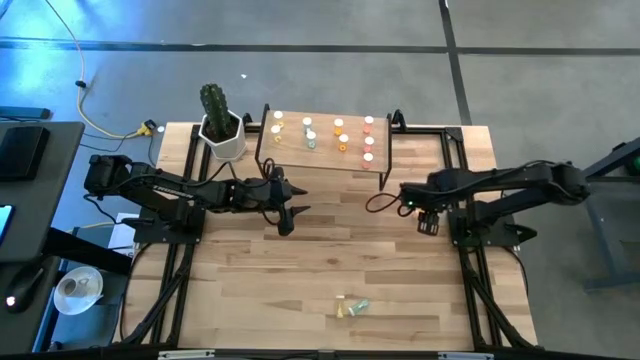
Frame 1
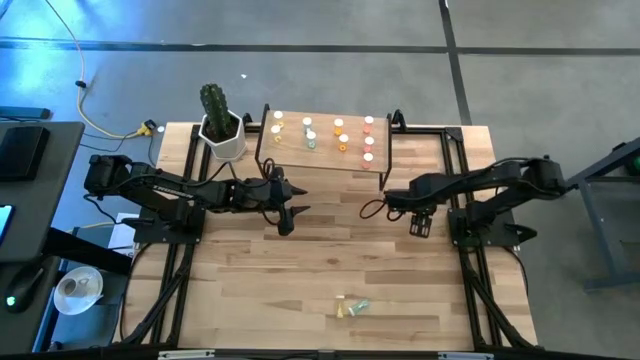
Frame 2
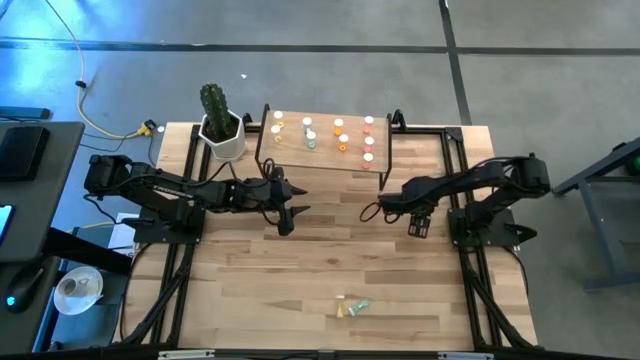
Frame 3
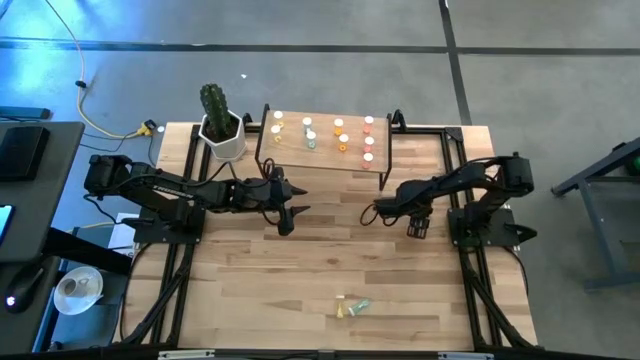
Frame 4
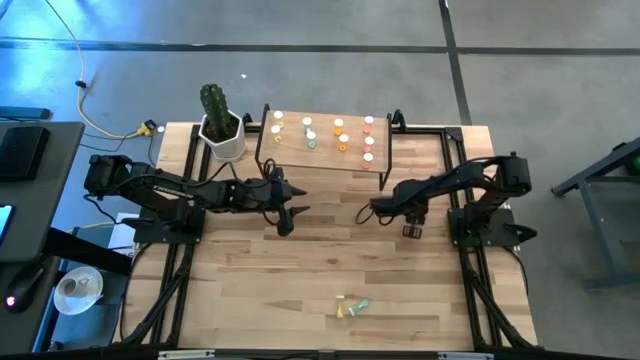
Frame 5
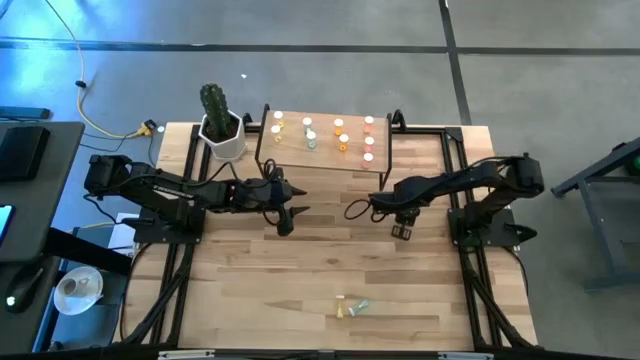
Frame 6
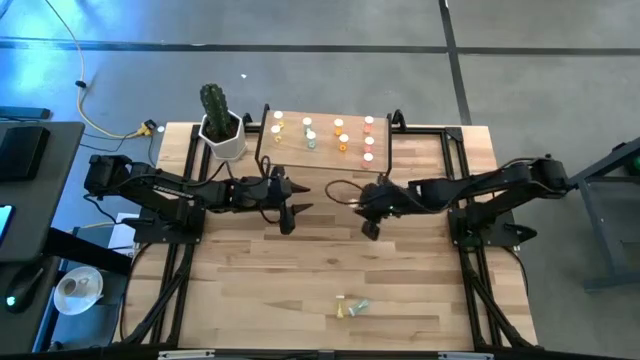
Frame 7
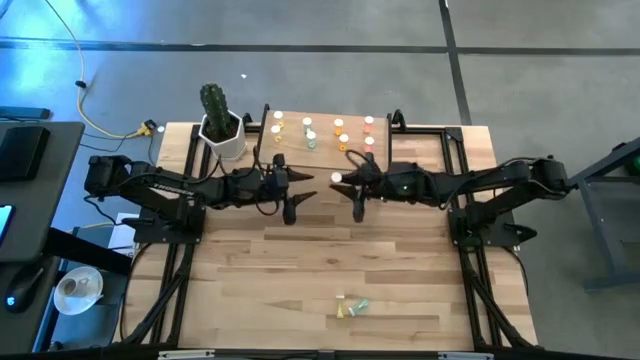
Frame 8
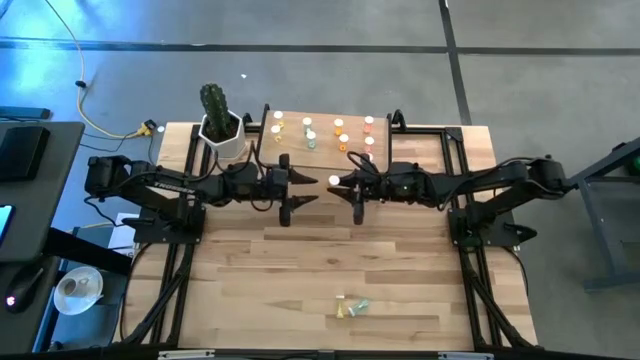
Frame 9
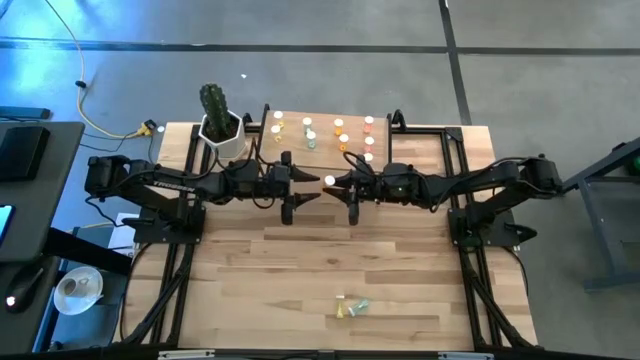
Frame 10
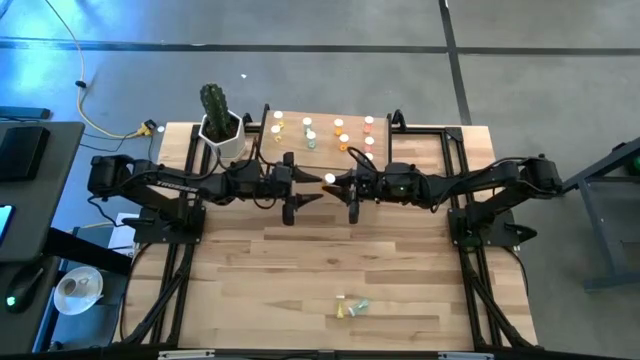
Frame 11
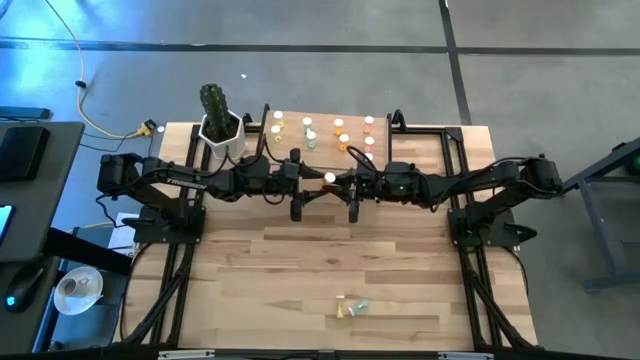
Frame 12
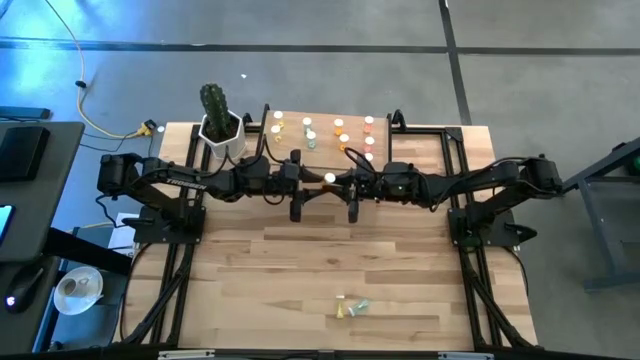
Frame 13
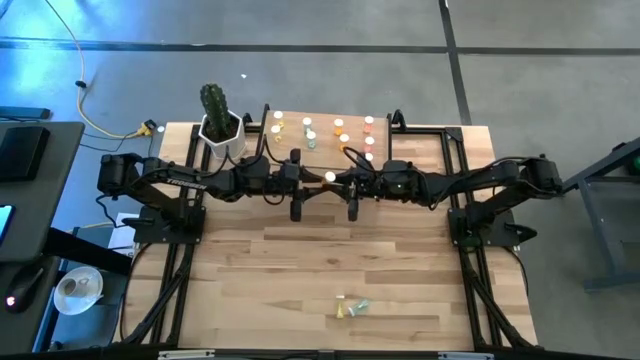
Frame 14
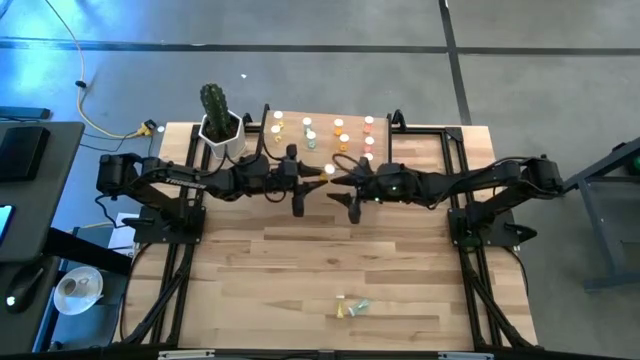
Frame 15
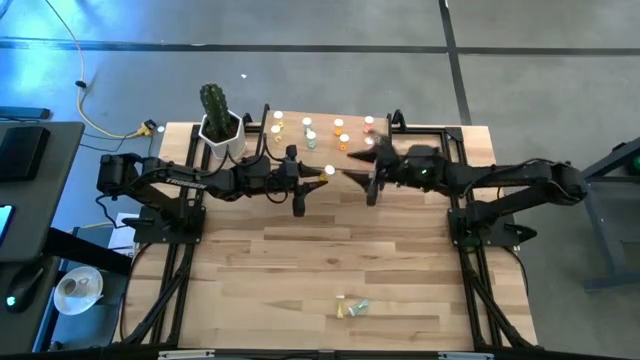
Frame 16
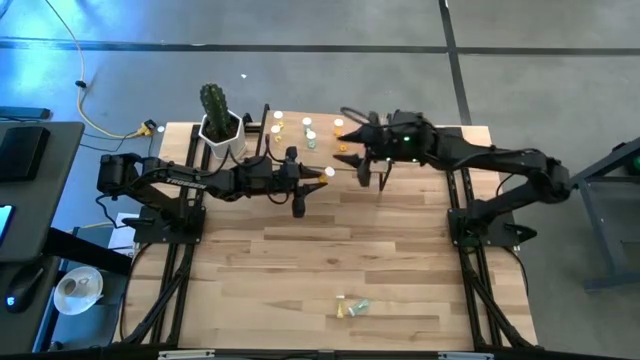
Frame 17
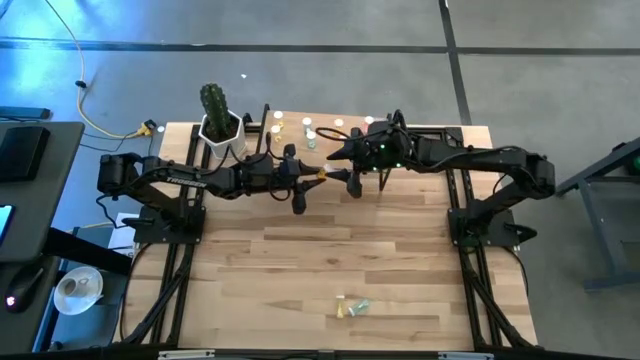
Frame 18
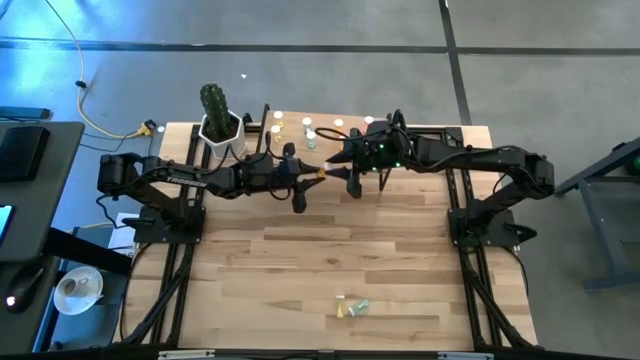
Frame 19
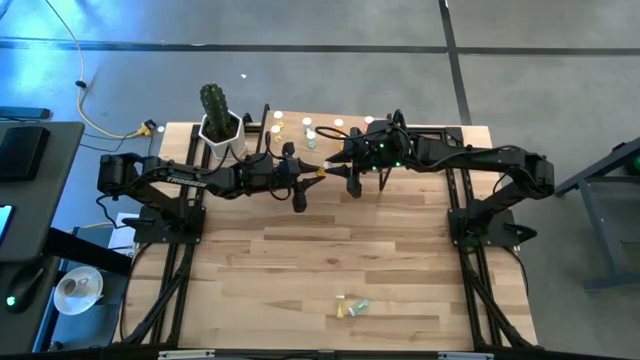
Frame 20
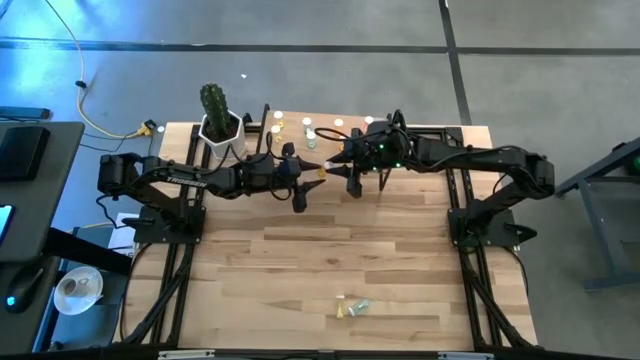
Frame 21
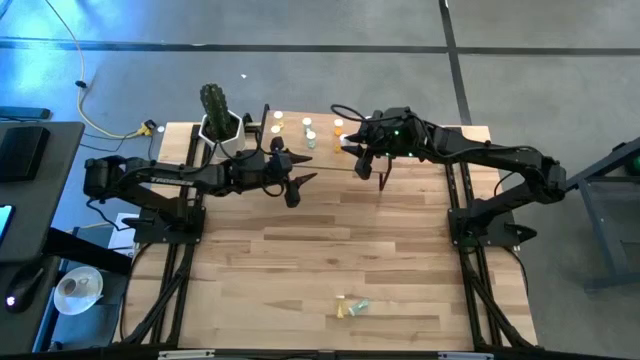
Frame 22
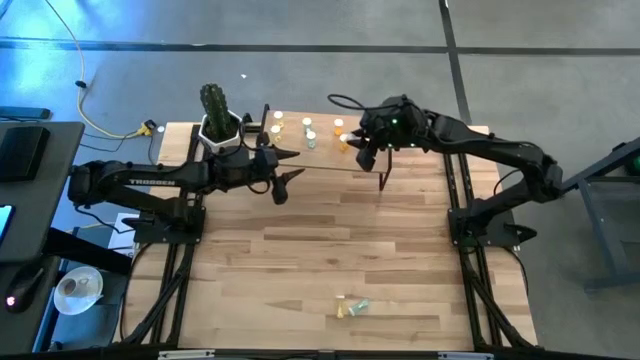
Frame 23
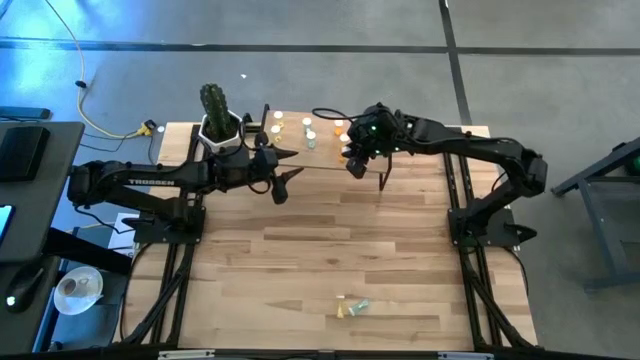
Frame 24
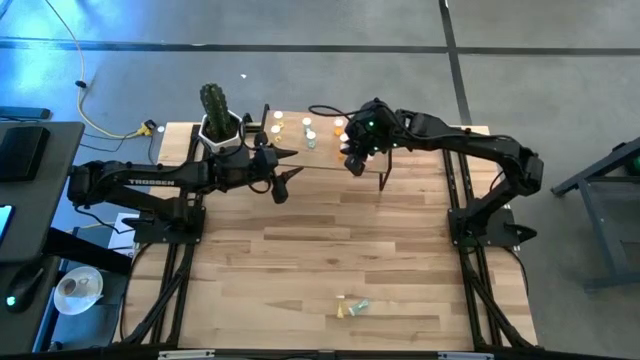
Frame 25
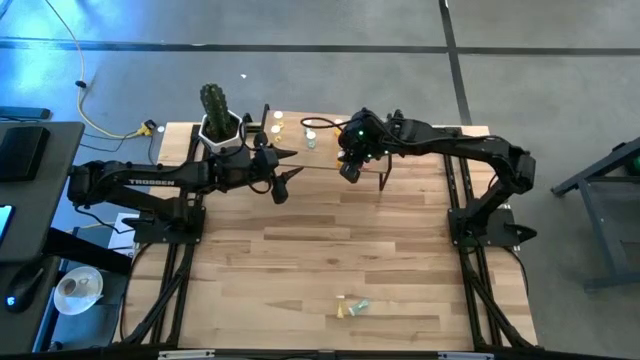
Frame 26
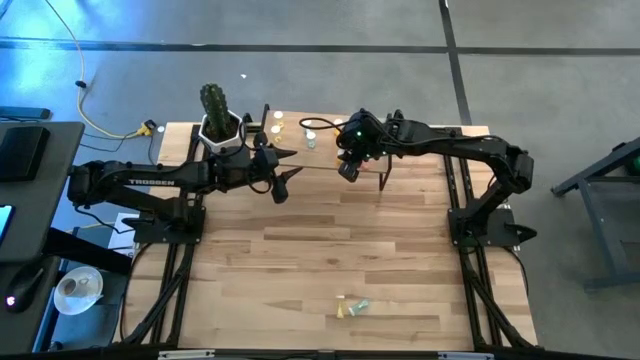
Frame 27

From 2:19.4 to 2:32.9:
Task: Pick and place medicine bottles onto shelf by color
Put the orange pill bottle on the shelf aligned with the other orange pill bottles

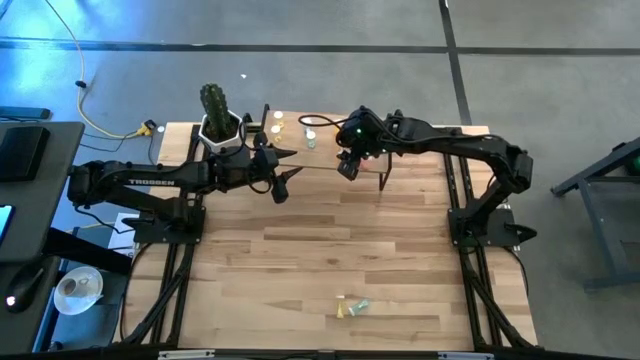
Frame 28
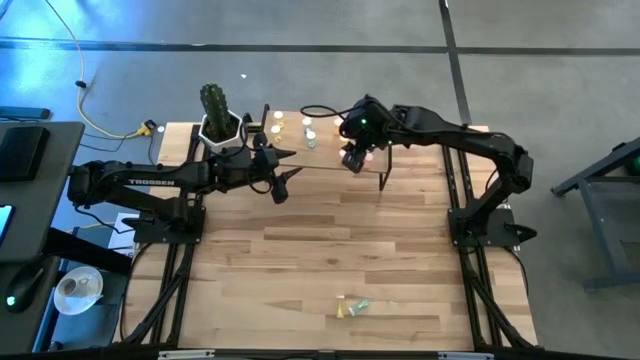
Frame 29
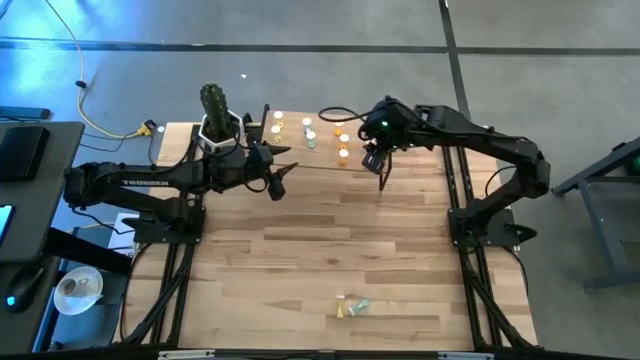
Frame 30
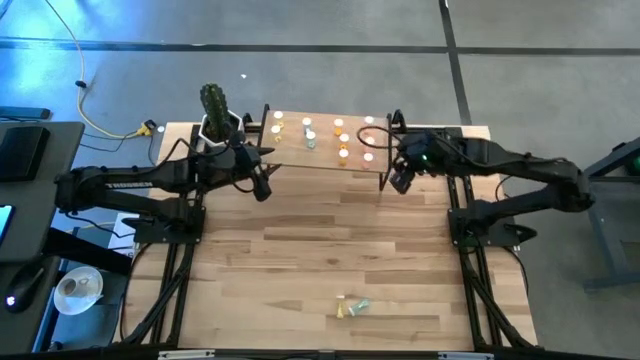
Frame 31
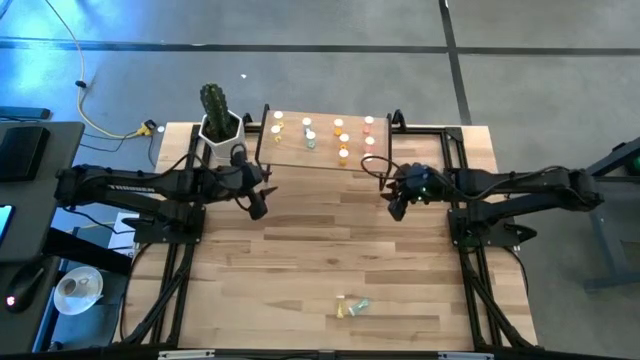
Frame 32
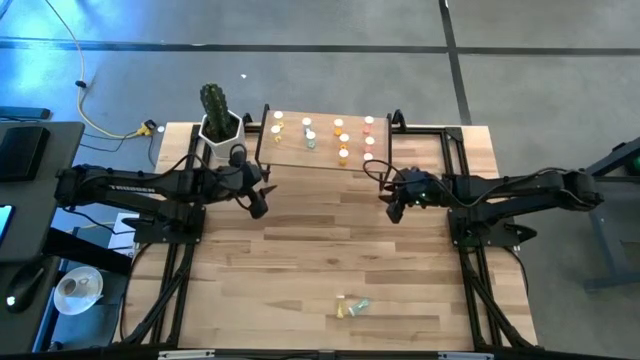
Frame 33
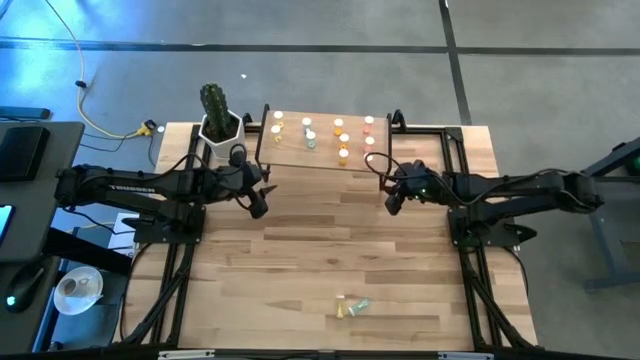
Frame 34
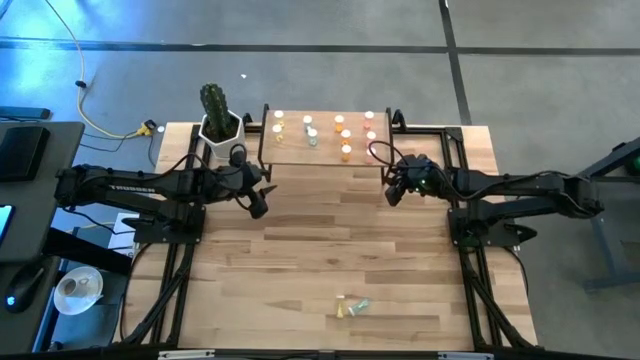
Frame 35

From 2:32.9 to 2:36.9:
Adjust the shelf

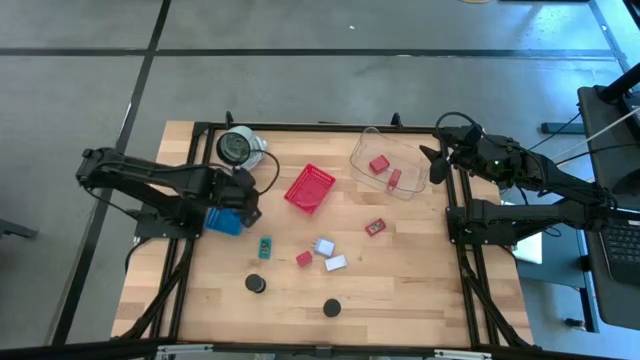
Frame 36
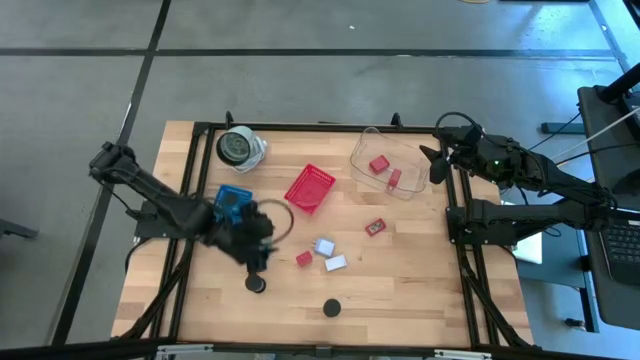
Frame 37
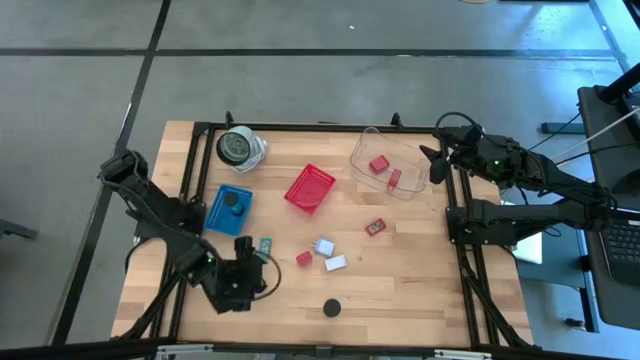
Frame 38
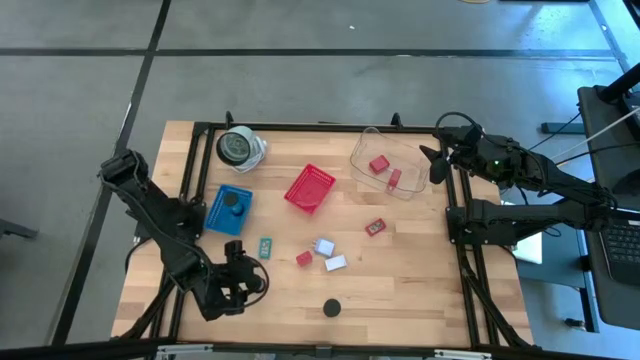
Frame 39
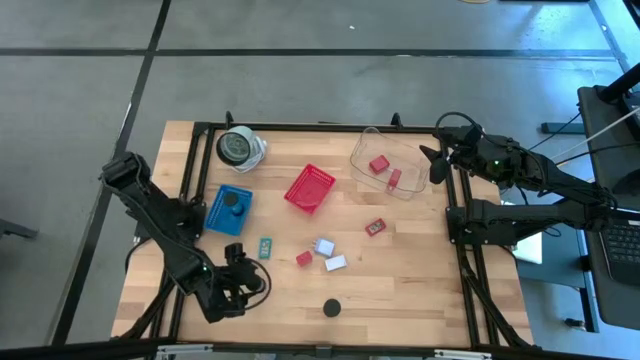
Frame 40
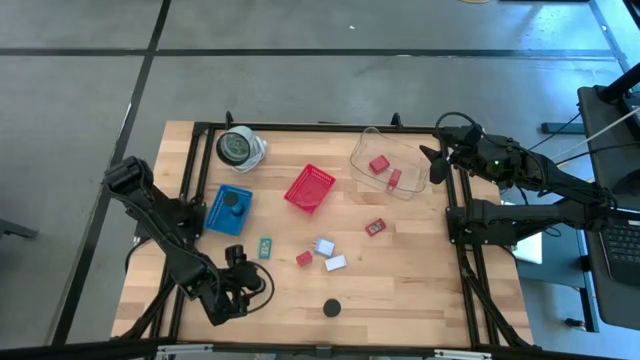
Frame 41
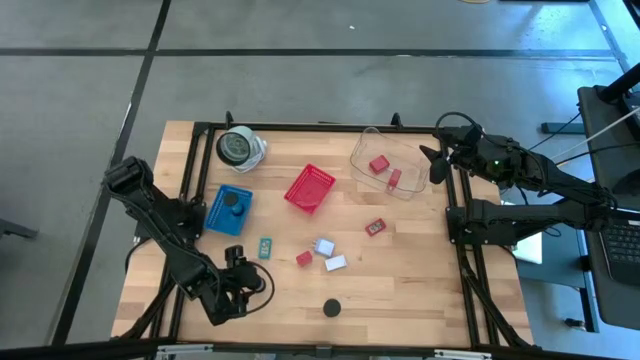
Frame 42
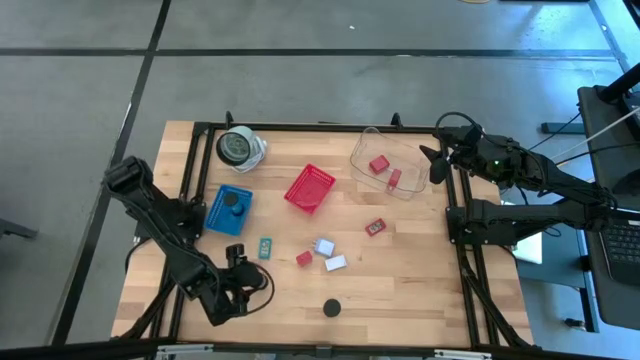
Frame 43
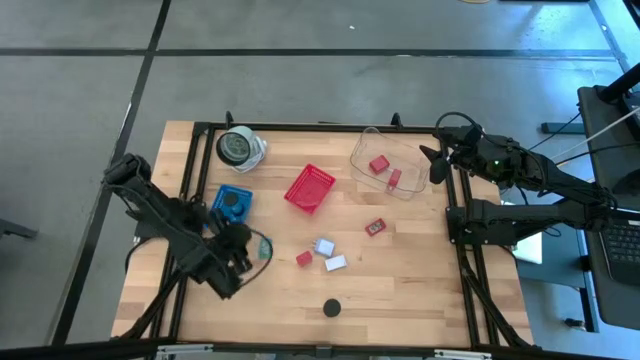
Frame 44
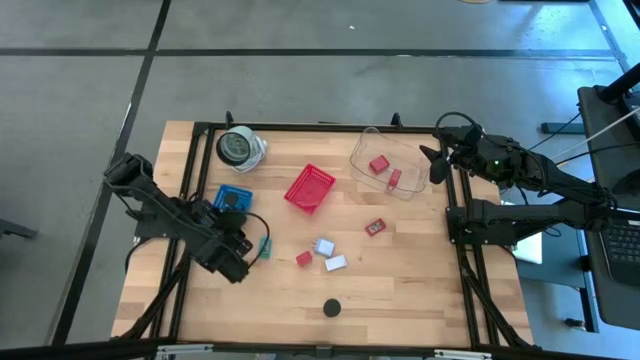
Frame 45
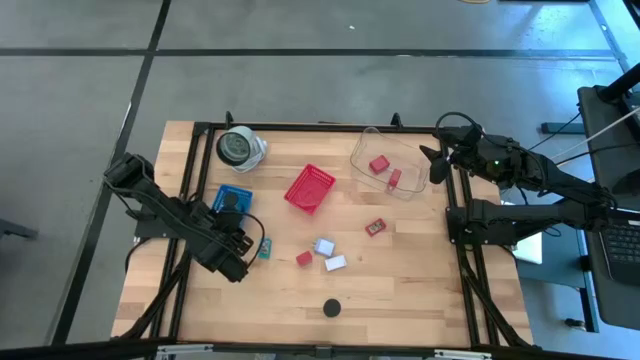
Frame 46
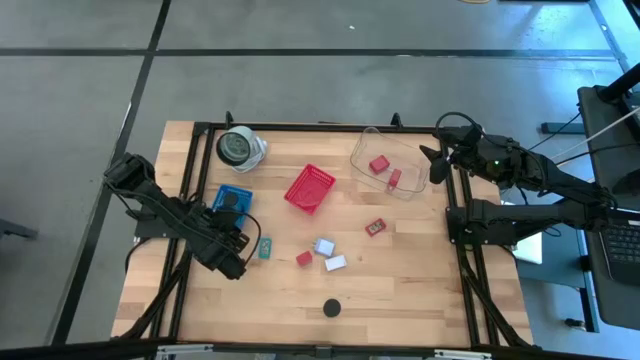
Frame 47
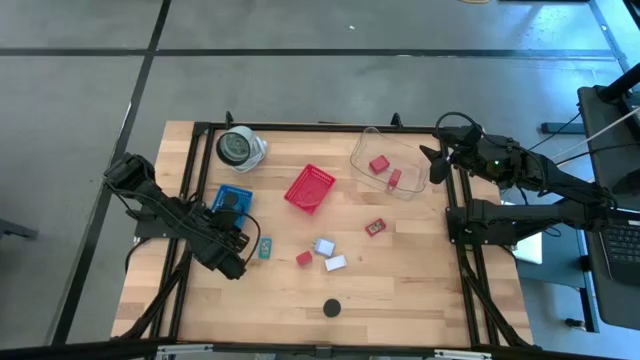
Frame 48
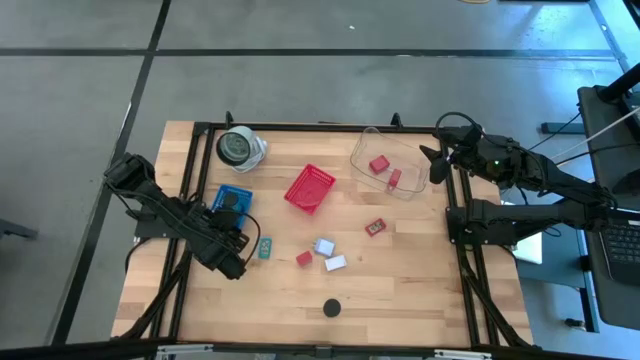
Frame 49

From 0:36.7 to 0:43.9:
Task: Pick & Place Office items
Put the dark blue hourglass into the blue bin
